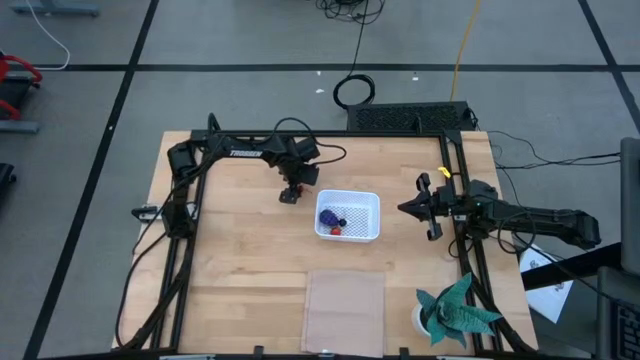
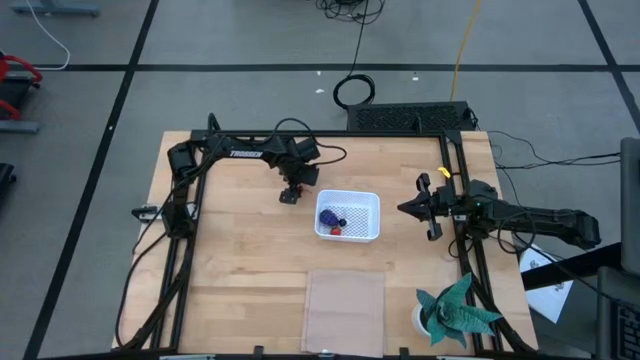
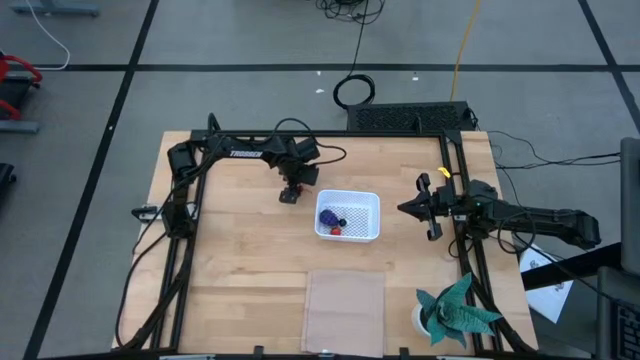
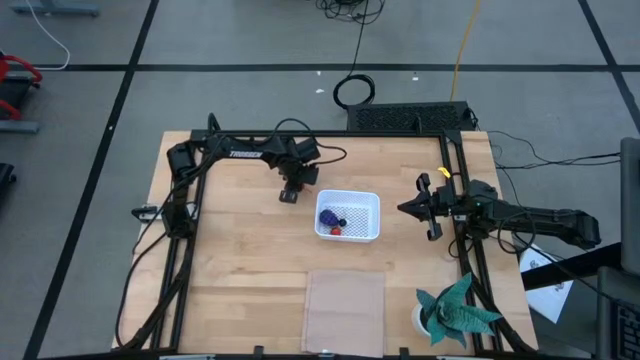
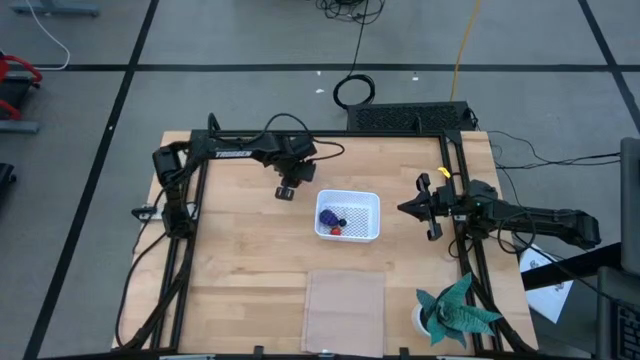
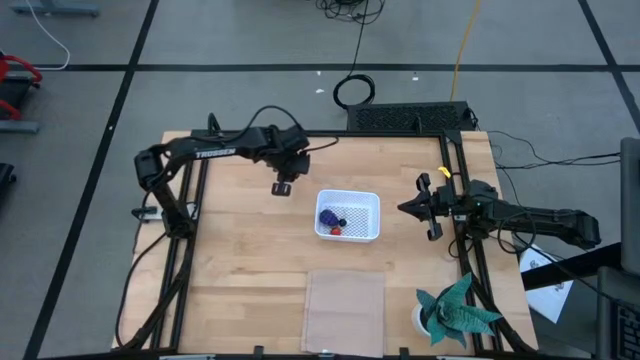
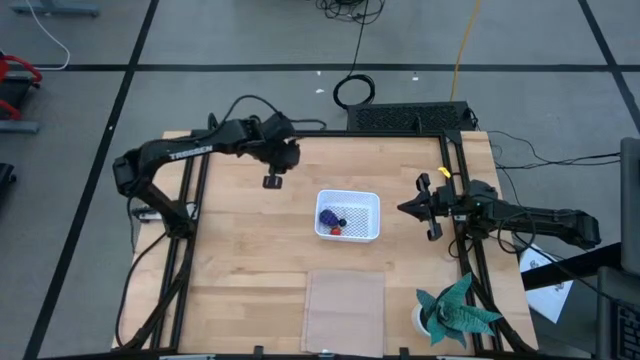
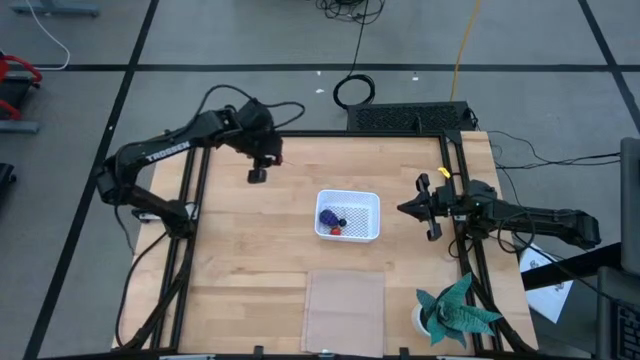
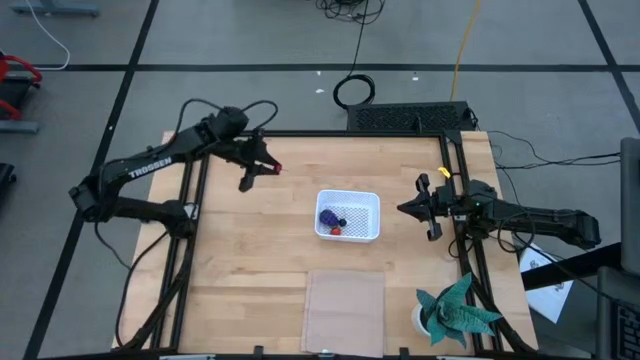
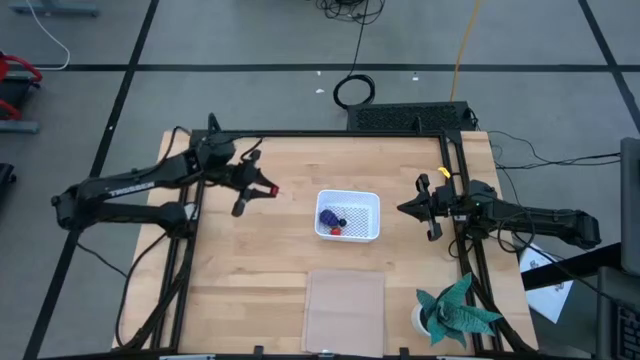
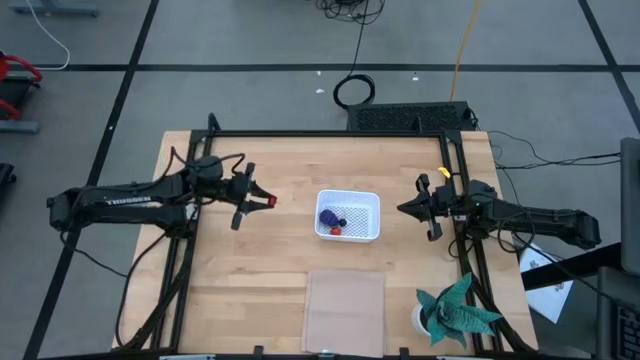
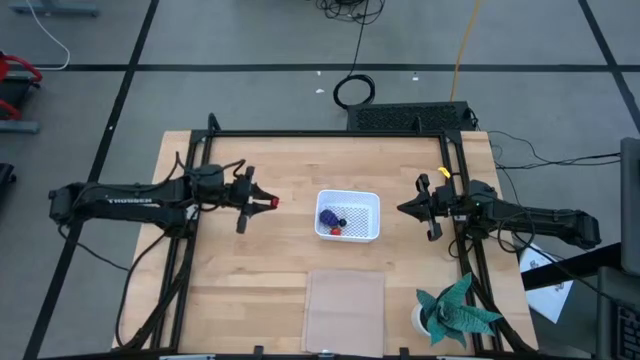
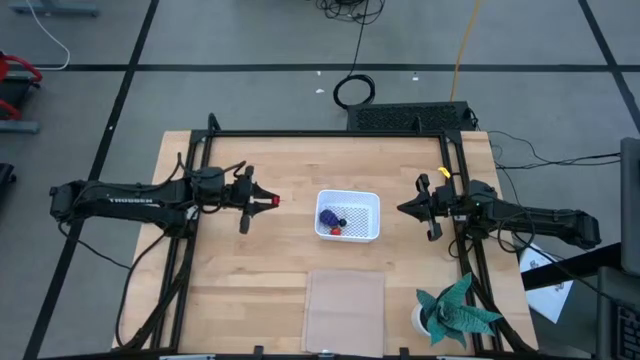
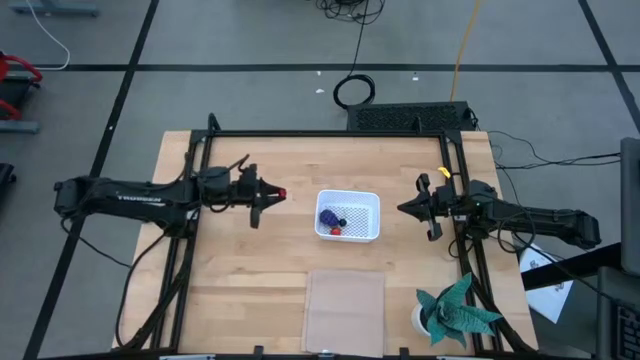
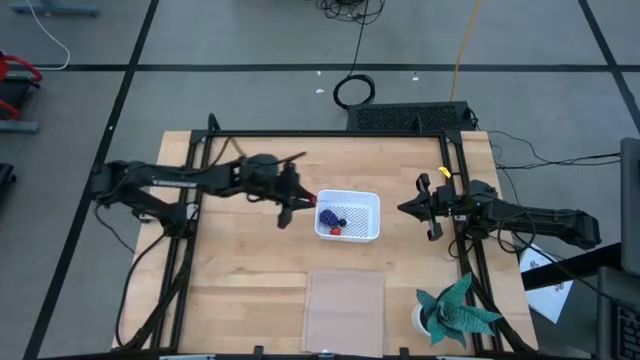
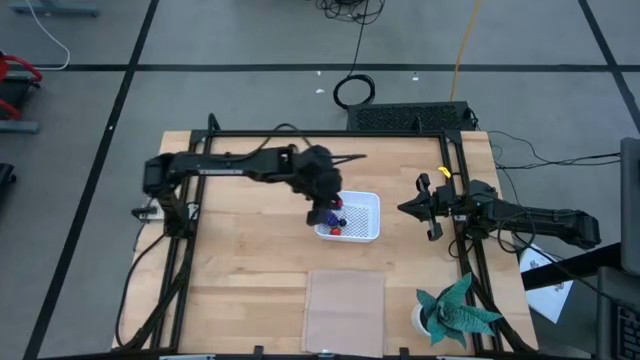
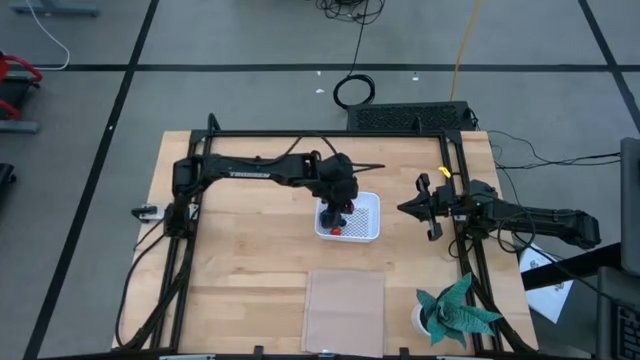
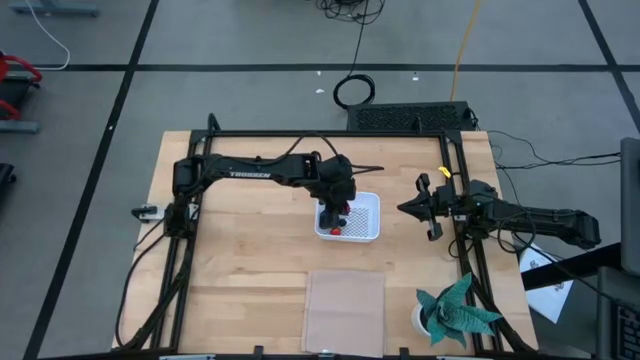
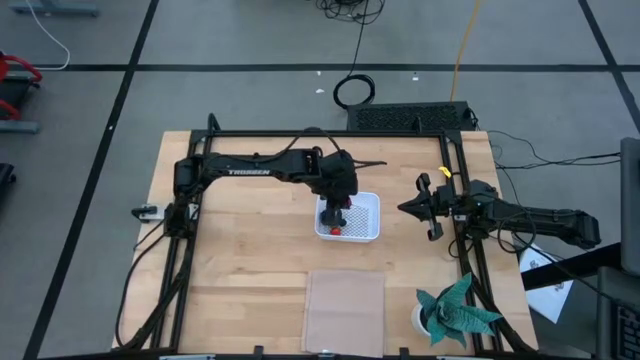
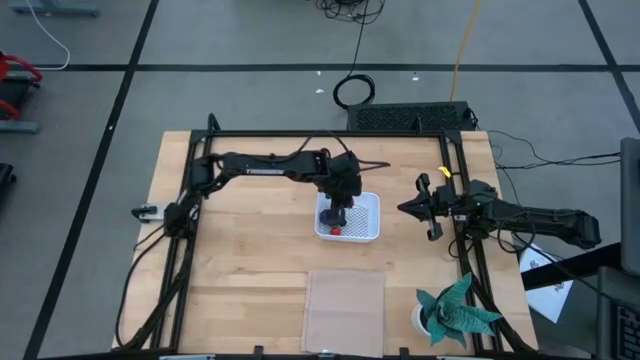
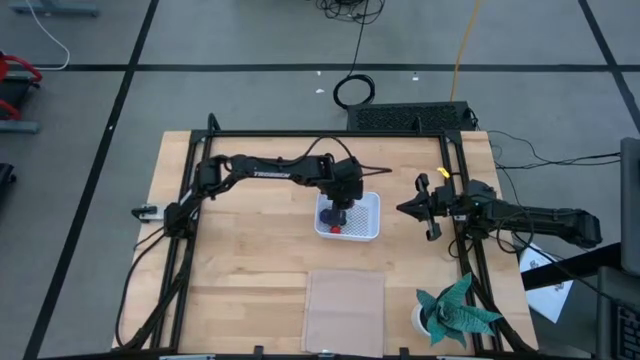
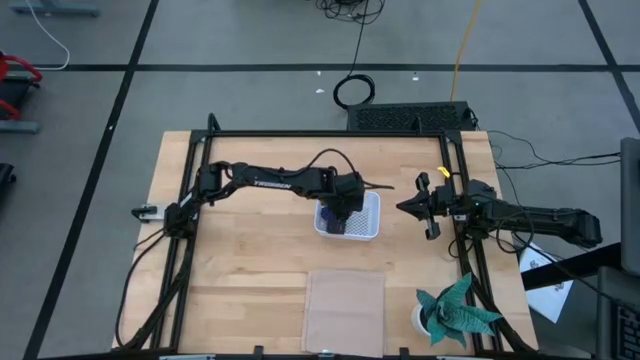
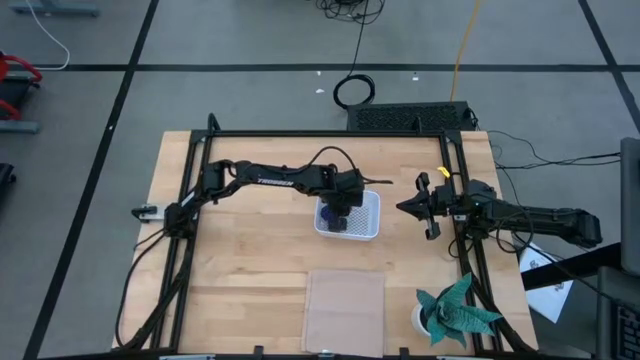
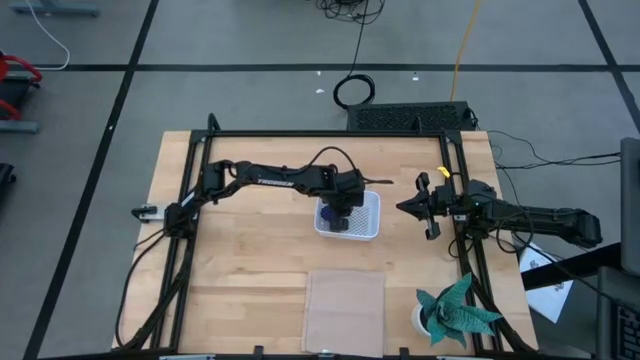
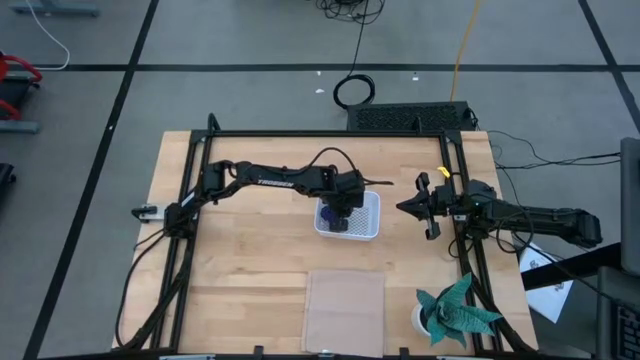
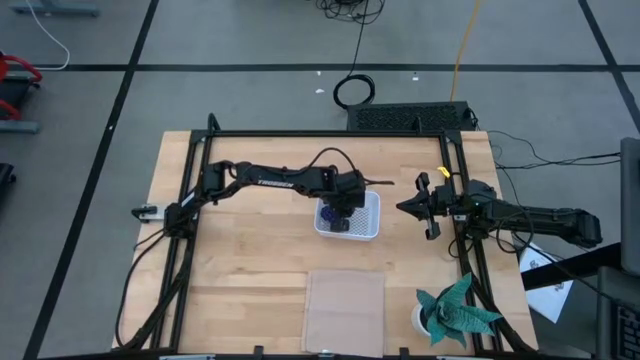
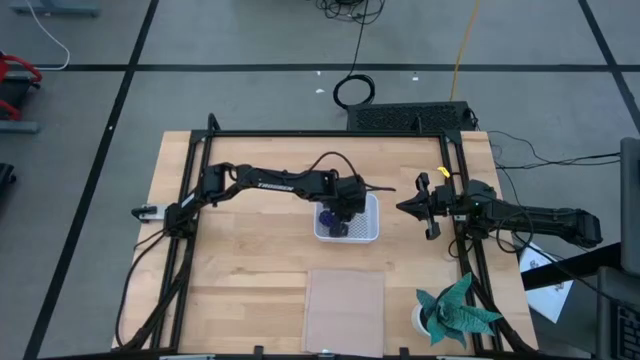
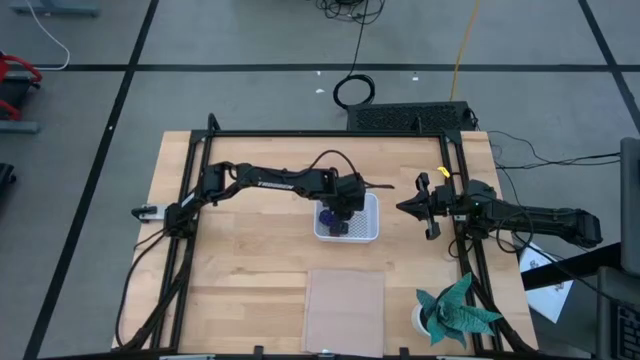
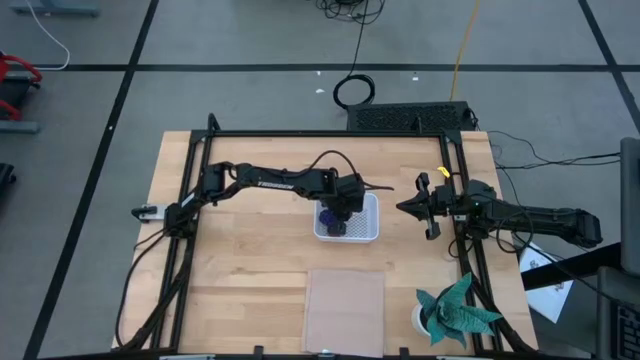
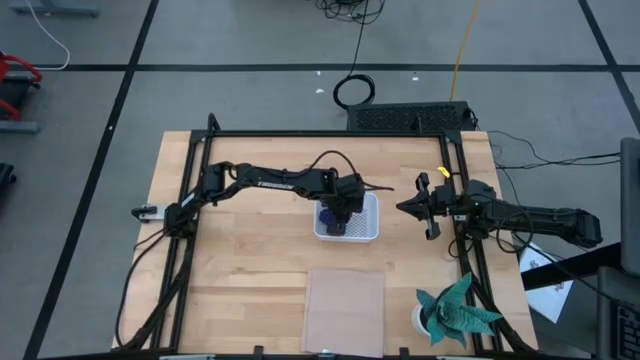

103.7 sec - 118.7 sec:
Task: Pick and placing Produce into tupperware
Put the red cherry into the white basket

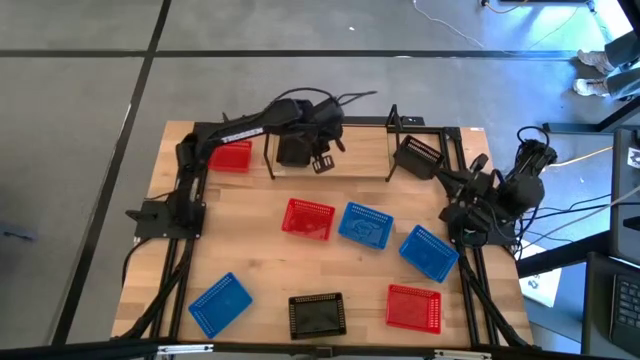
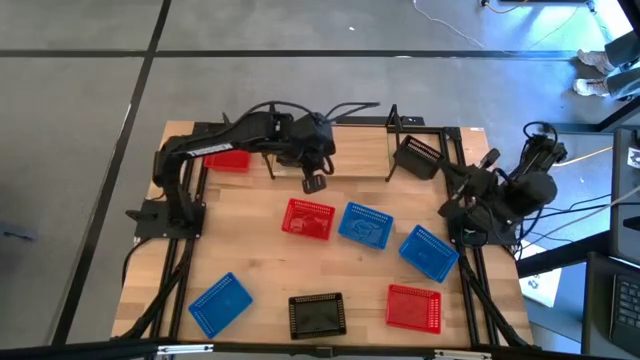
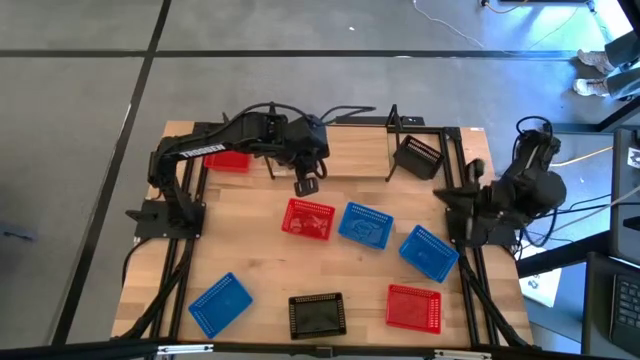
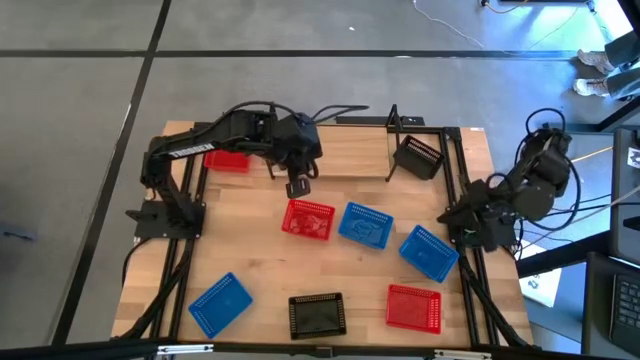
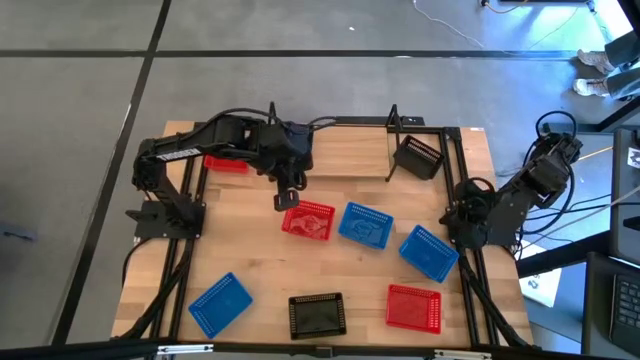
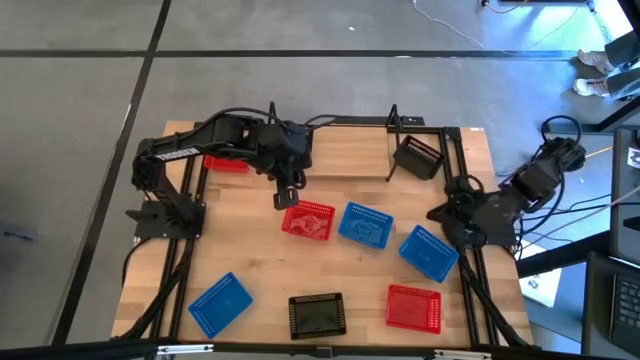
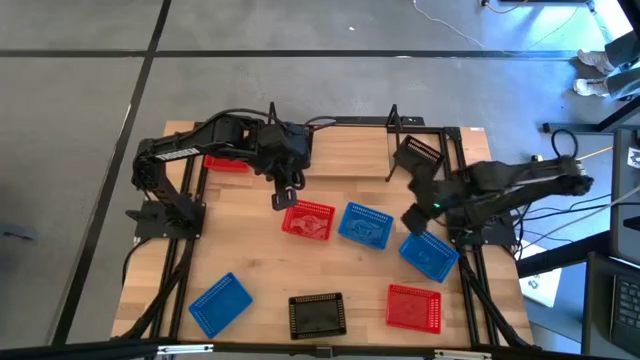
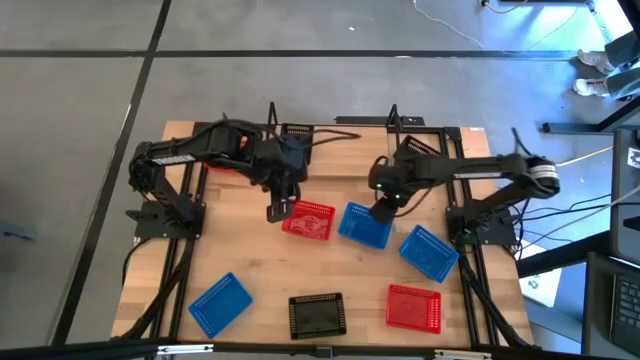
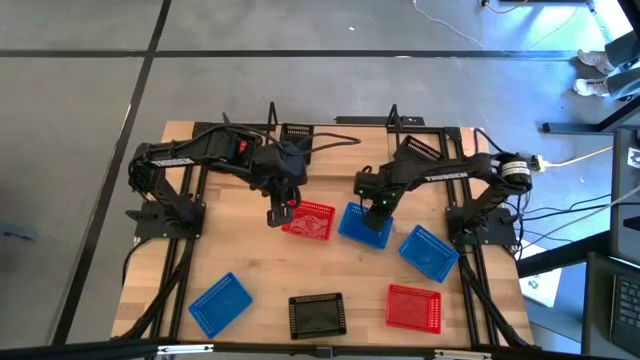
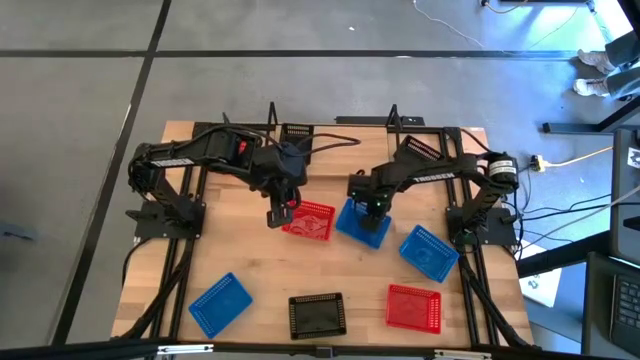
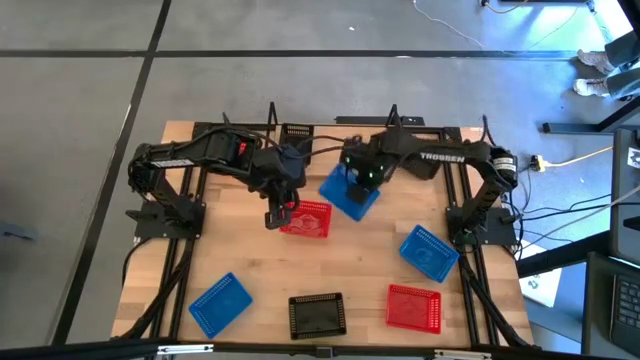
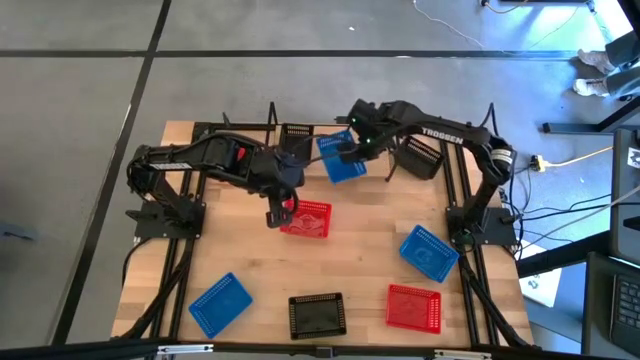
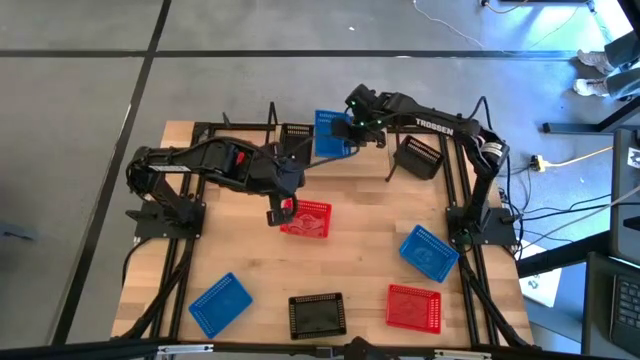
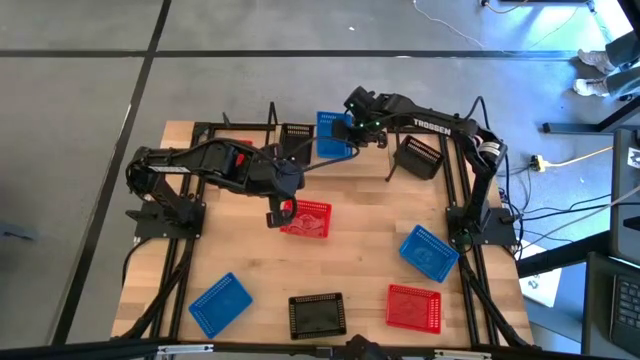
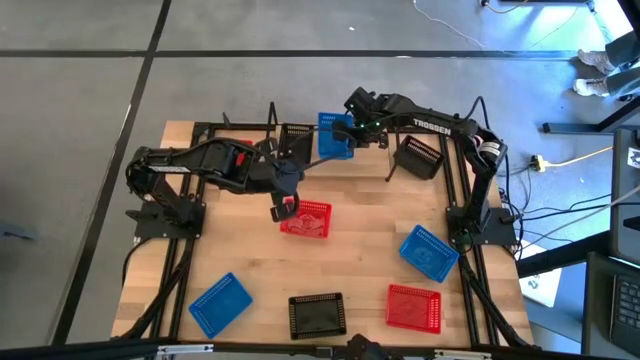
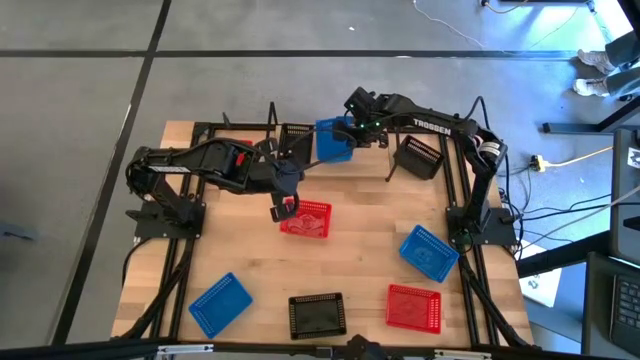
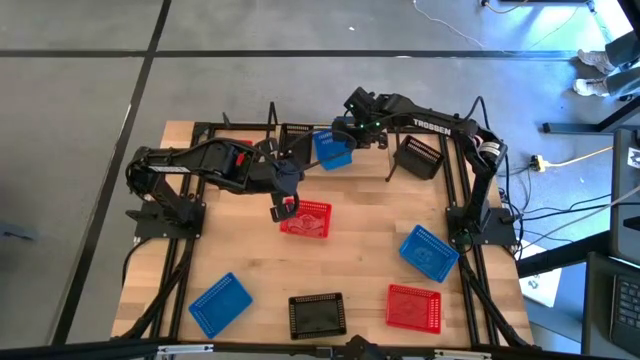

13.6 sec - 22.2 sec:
Task: Stack baskets on shelf by color
Put the middle blue bin on the shelf
